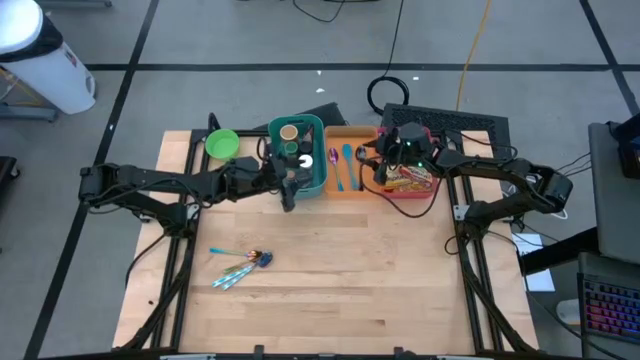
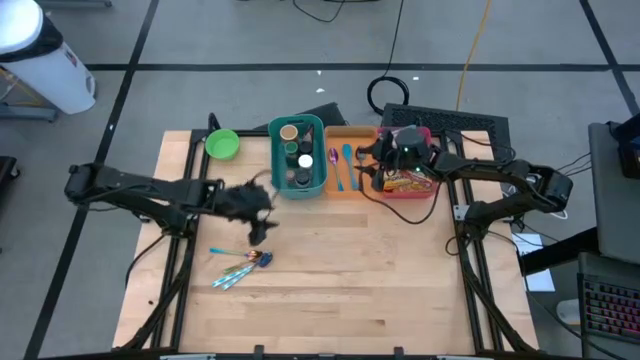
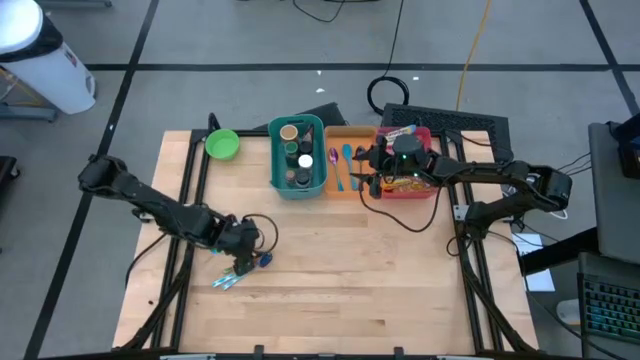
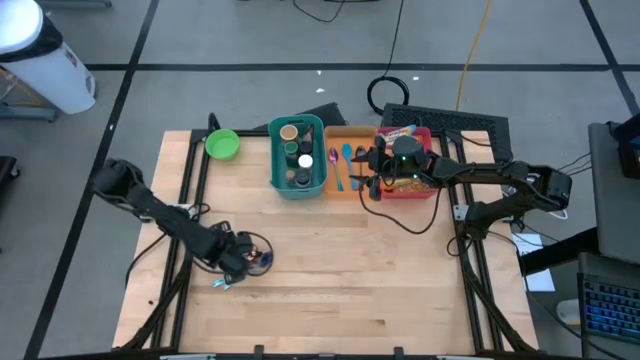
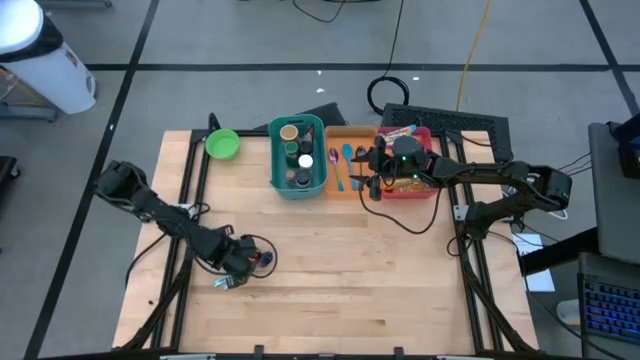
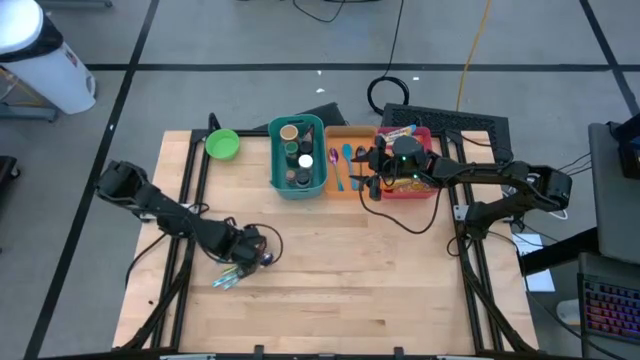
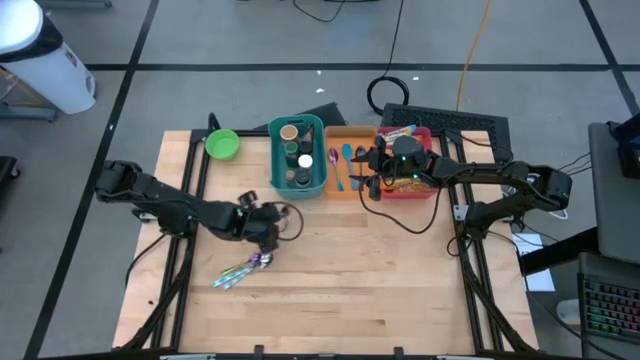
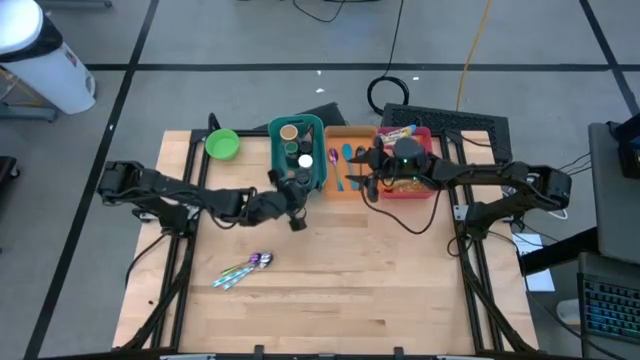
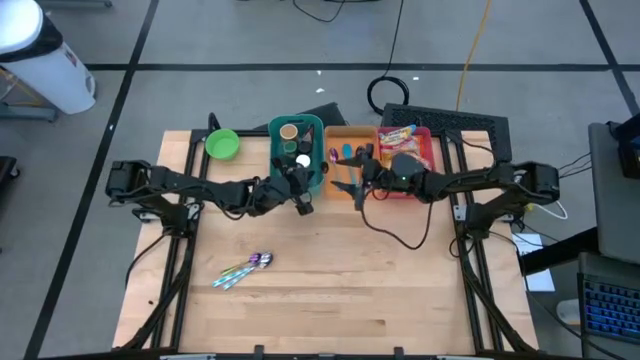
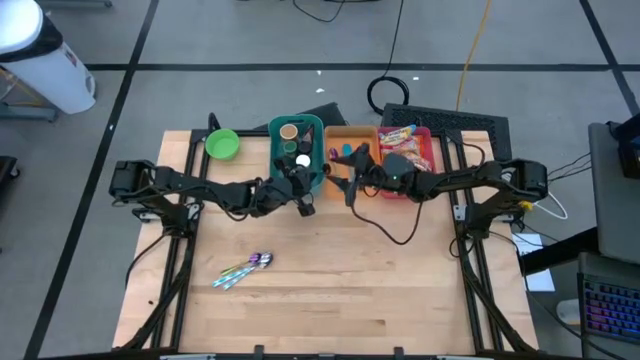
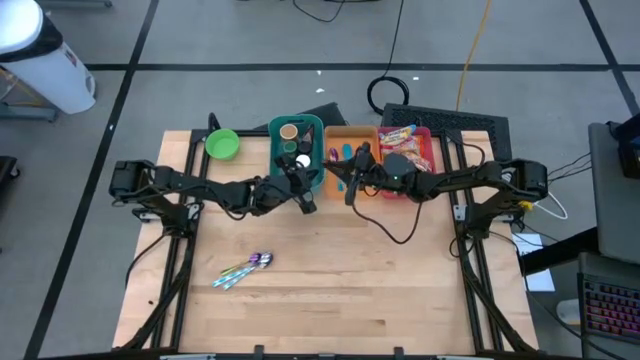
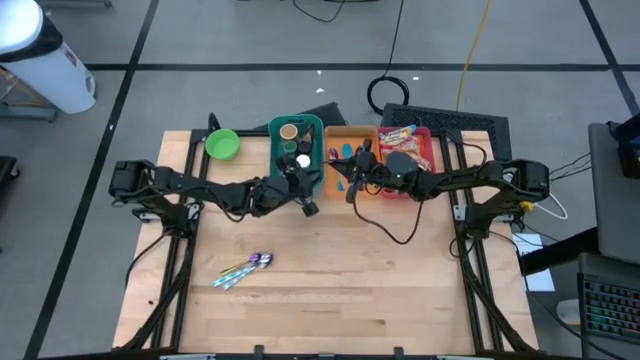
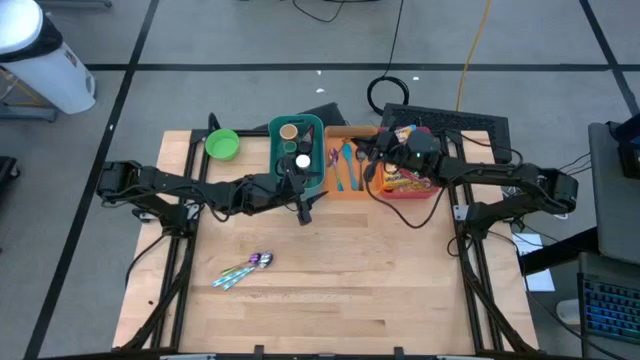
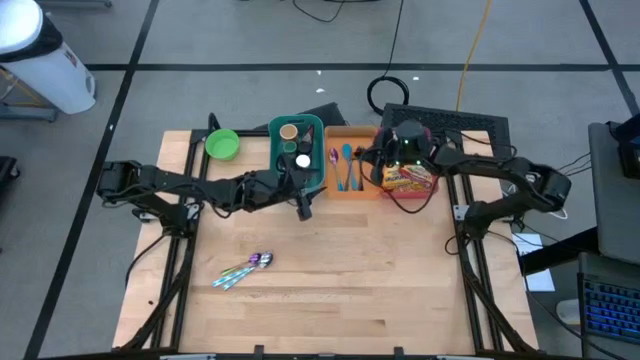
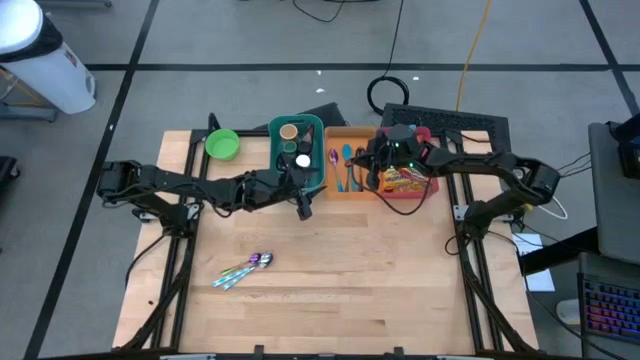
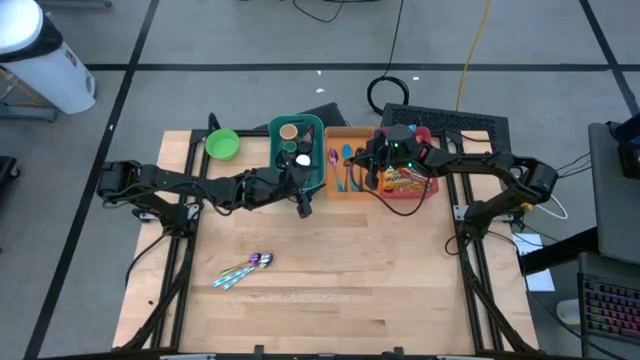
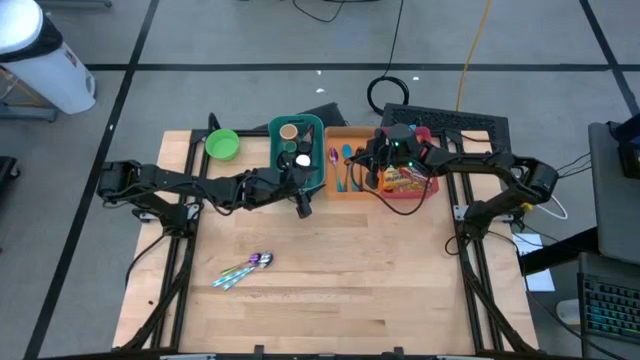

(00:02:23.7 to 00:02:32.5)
Task: Pick & Place Food Item
Put the purple spoon into the orange bin

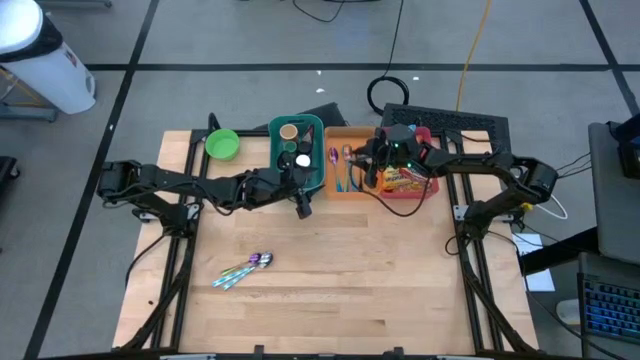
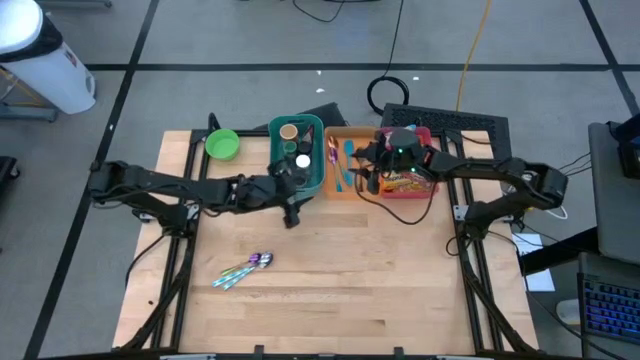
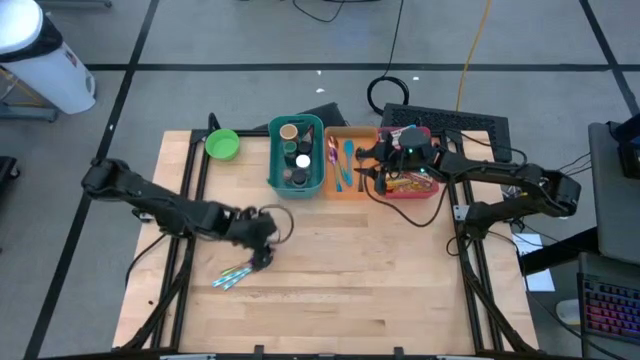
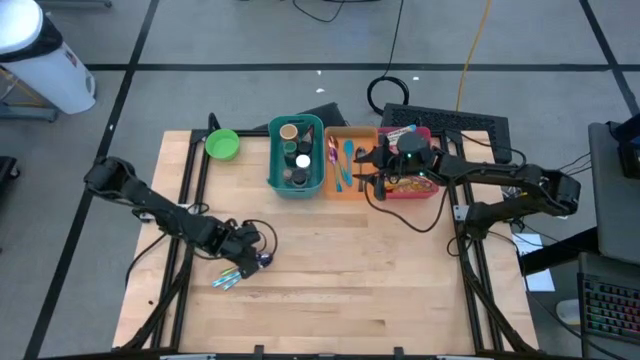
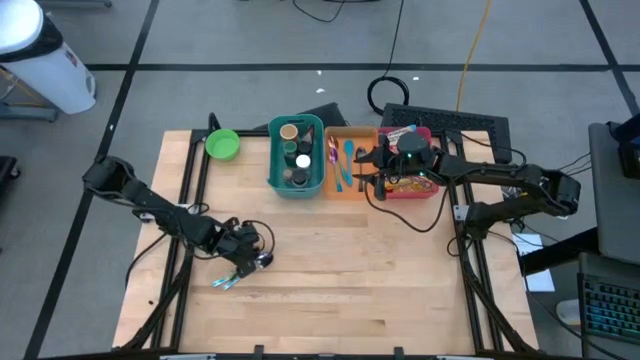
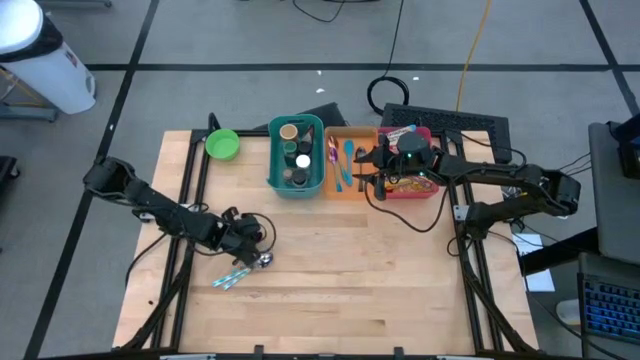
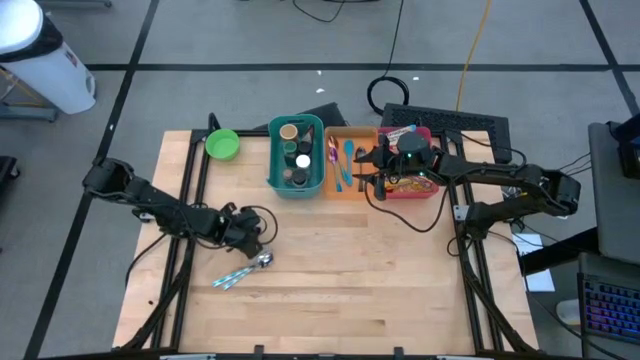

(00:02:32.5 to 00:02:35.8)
Put the purple spoon into the orange bin

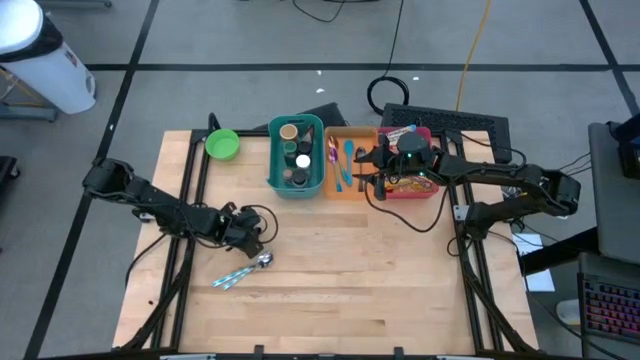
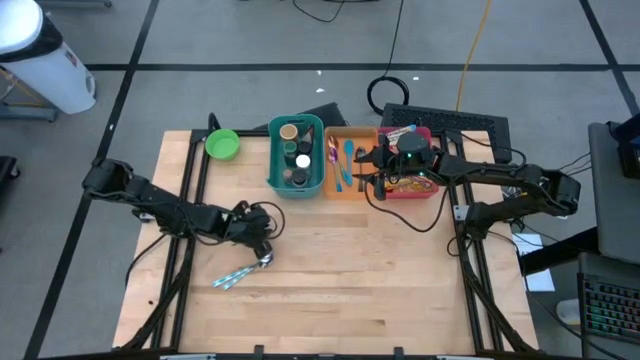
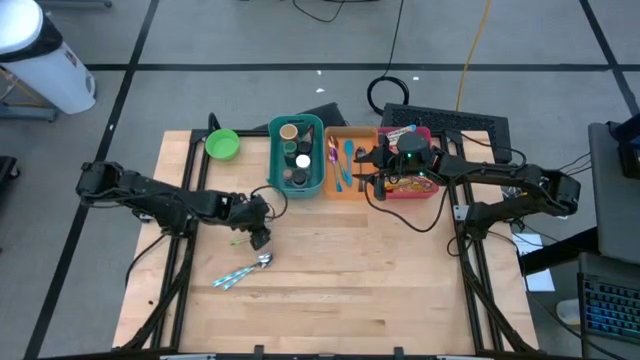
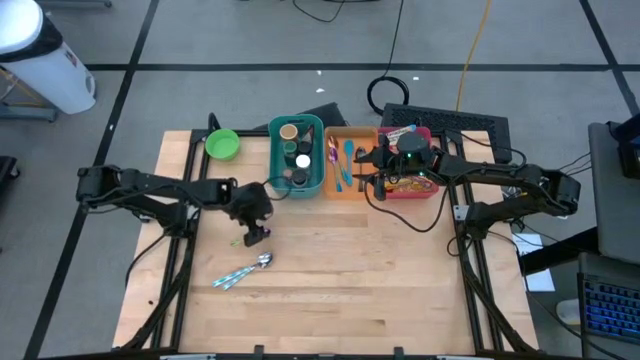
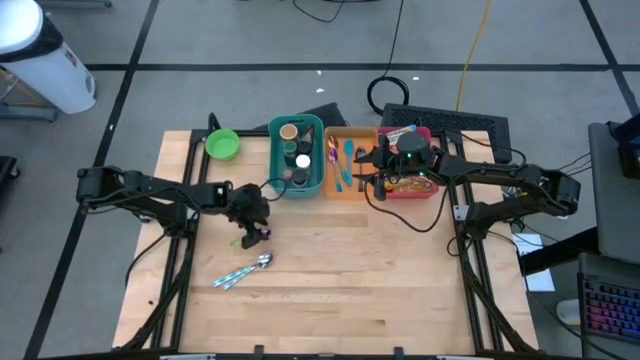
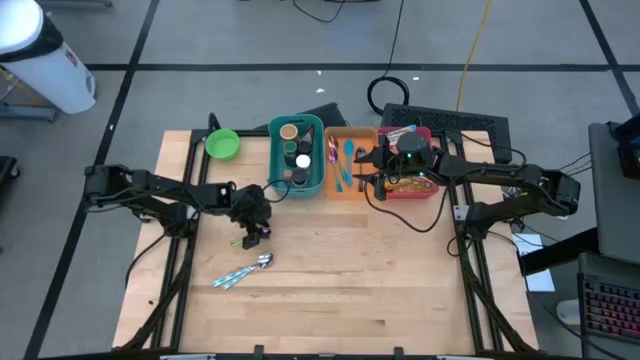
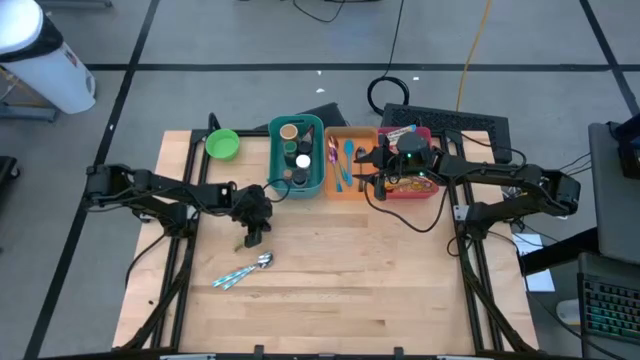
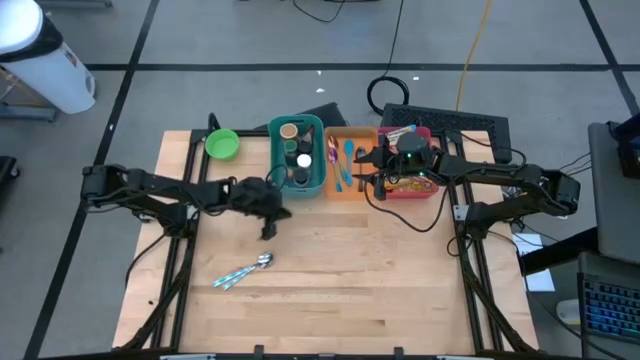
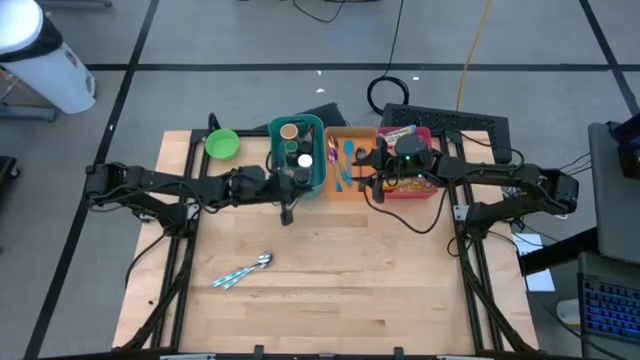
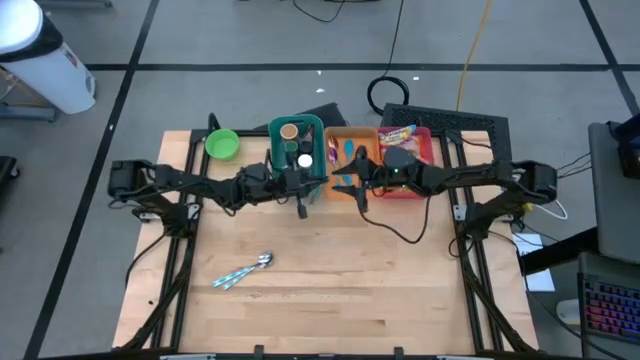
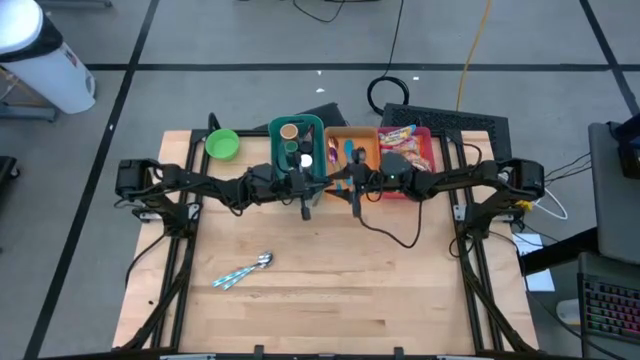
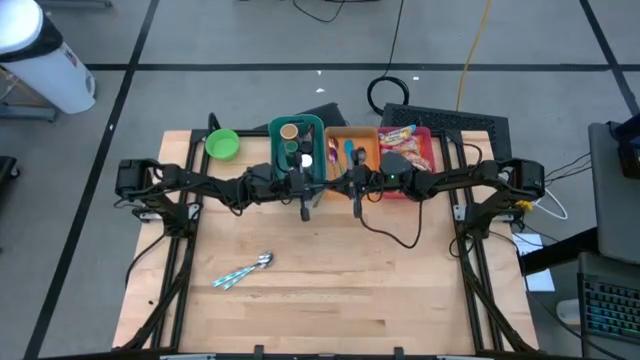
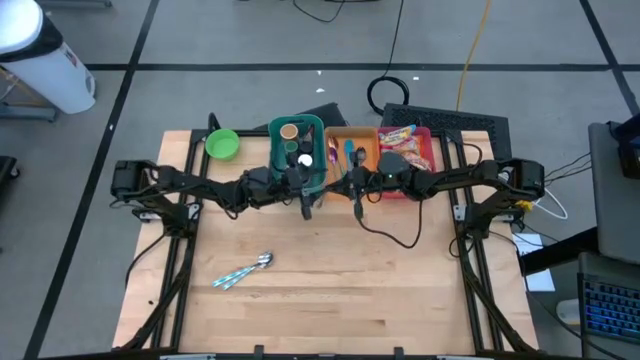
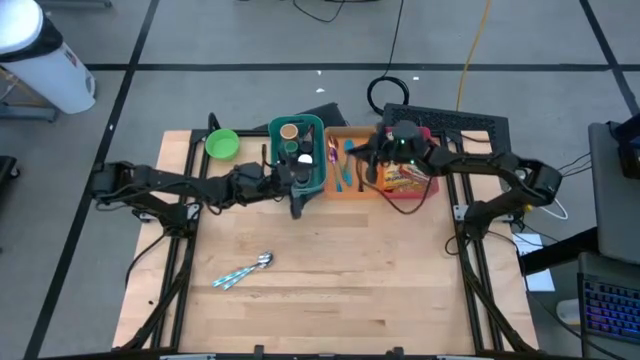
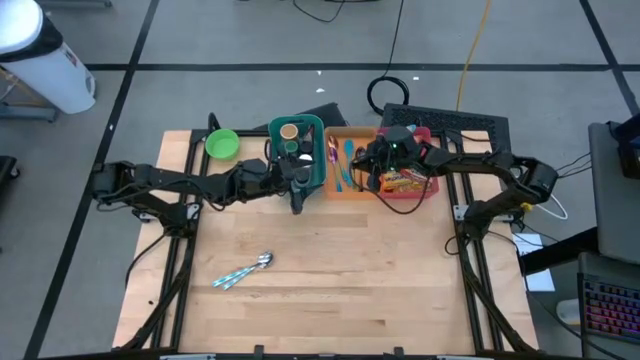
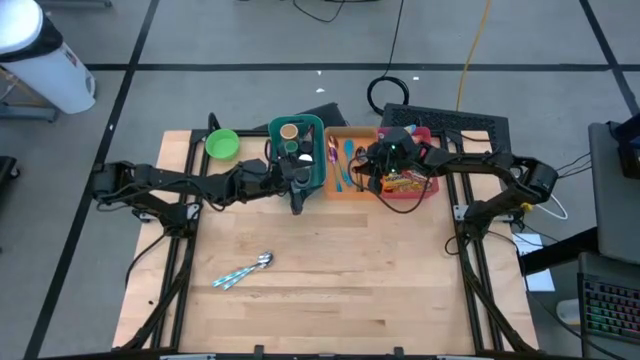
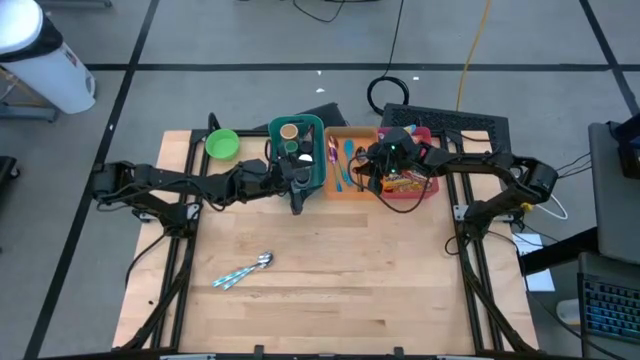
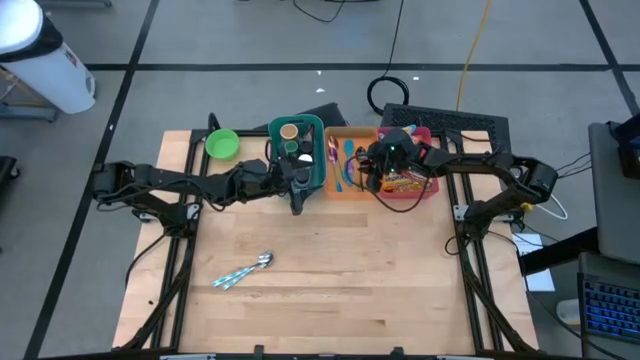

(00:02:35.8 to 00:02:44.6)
Put the purple spoon into the orange bin
